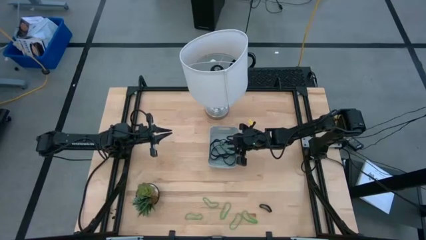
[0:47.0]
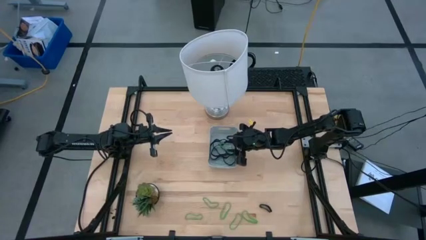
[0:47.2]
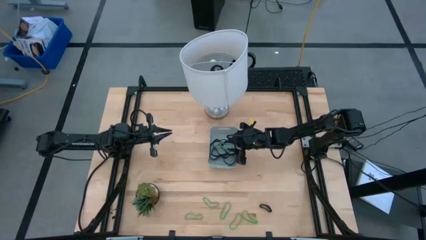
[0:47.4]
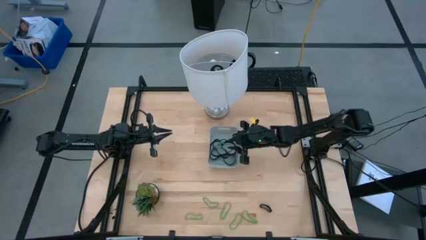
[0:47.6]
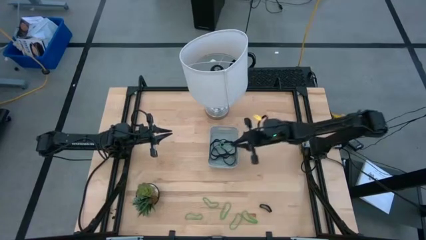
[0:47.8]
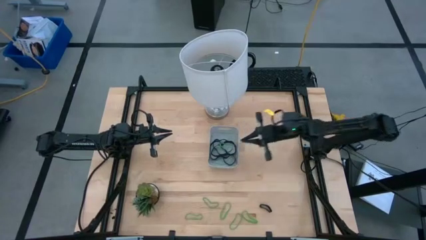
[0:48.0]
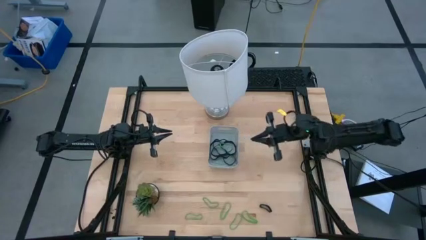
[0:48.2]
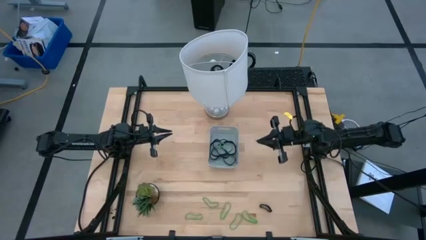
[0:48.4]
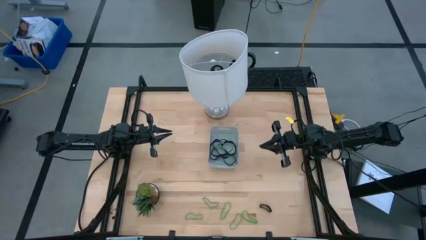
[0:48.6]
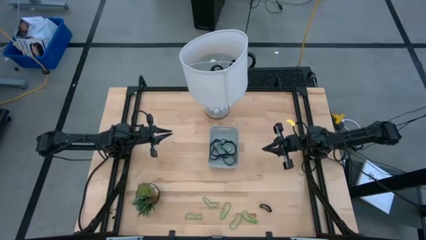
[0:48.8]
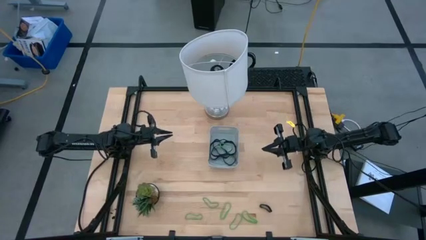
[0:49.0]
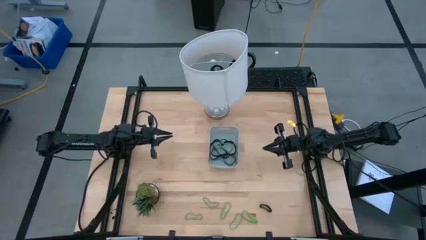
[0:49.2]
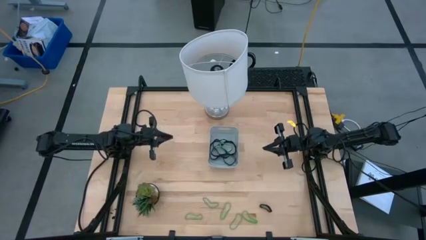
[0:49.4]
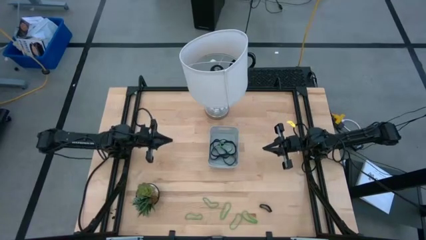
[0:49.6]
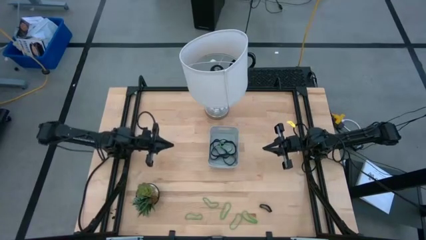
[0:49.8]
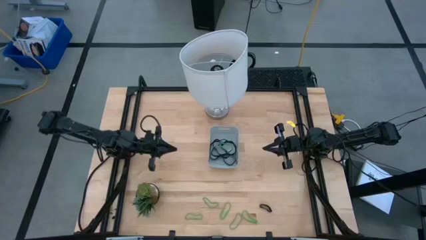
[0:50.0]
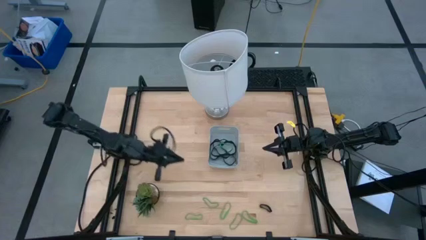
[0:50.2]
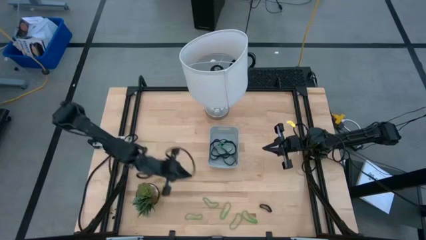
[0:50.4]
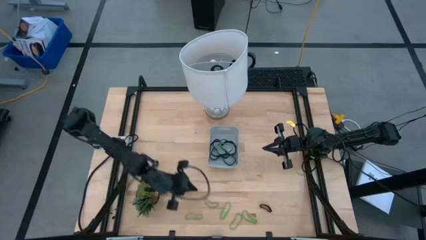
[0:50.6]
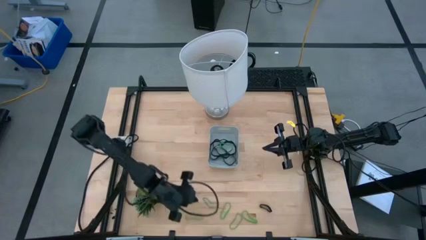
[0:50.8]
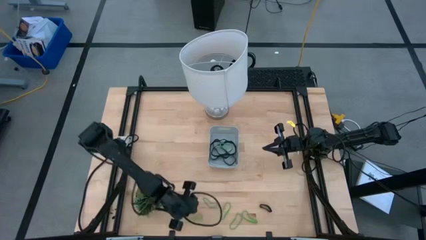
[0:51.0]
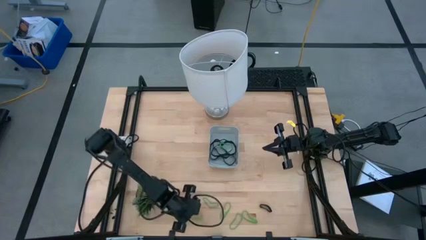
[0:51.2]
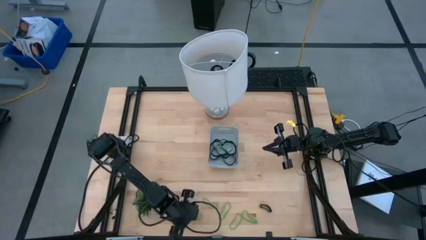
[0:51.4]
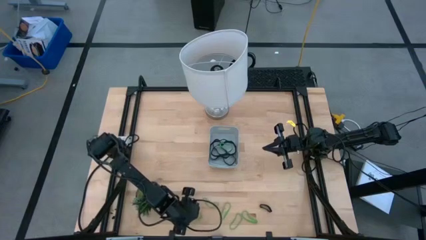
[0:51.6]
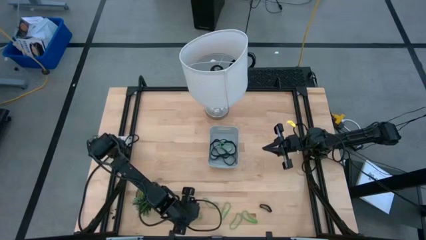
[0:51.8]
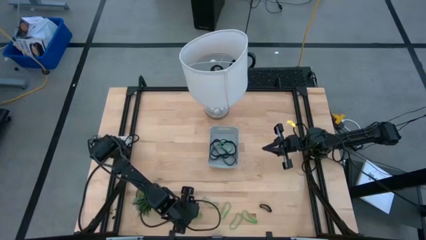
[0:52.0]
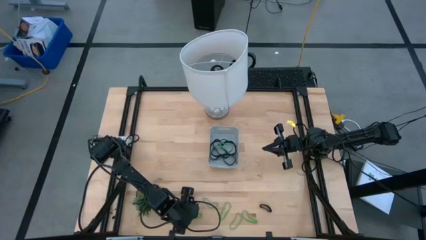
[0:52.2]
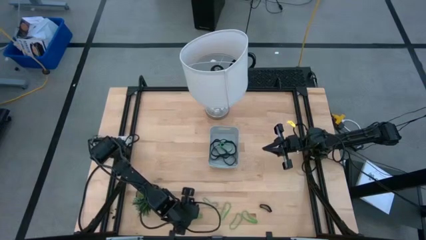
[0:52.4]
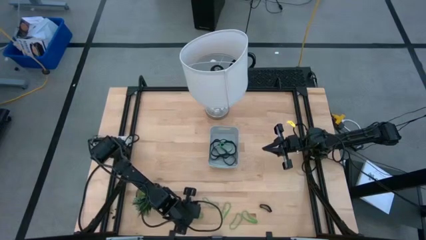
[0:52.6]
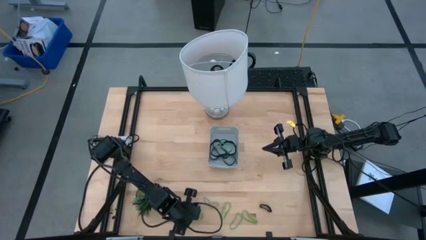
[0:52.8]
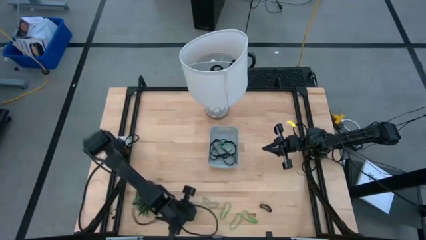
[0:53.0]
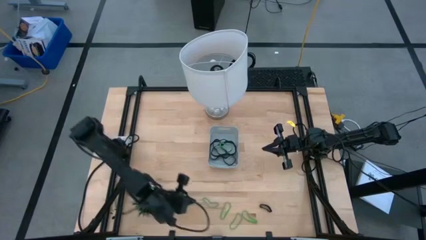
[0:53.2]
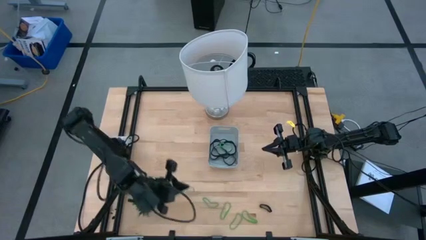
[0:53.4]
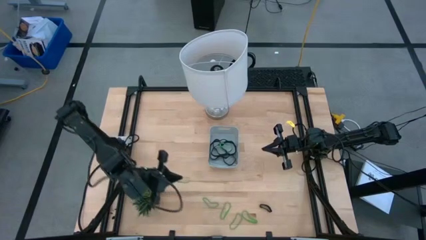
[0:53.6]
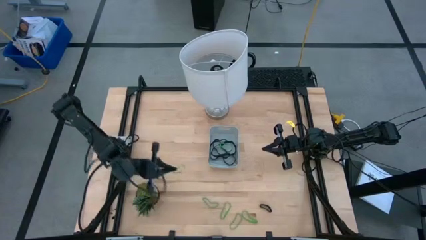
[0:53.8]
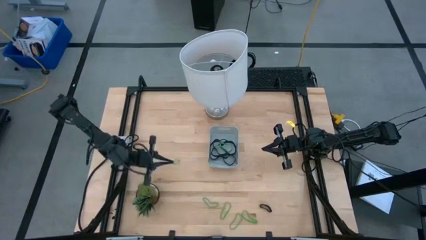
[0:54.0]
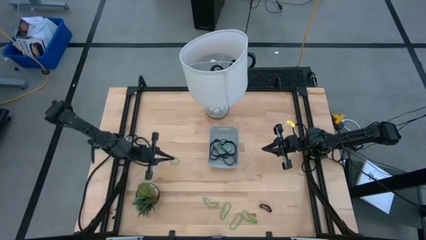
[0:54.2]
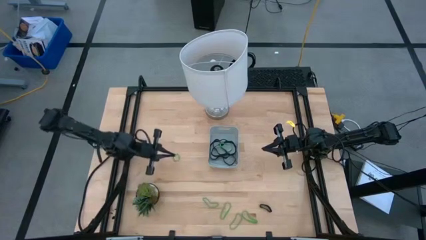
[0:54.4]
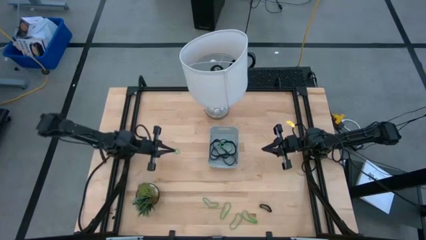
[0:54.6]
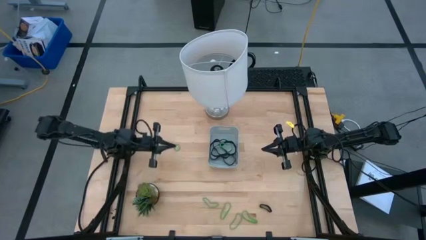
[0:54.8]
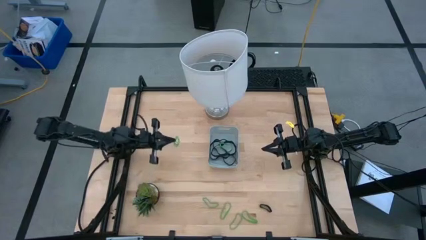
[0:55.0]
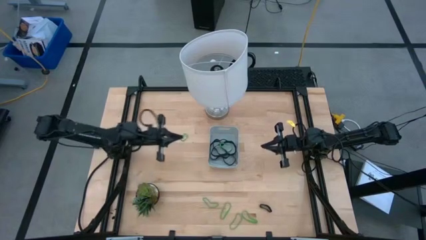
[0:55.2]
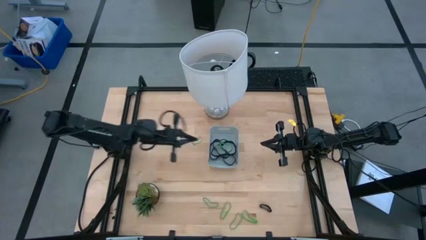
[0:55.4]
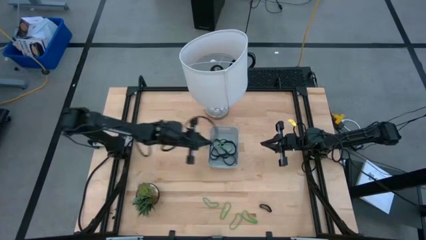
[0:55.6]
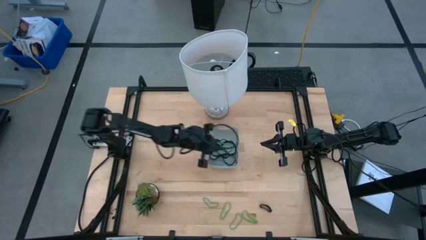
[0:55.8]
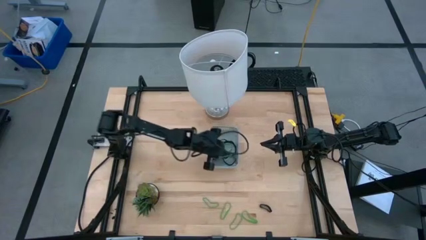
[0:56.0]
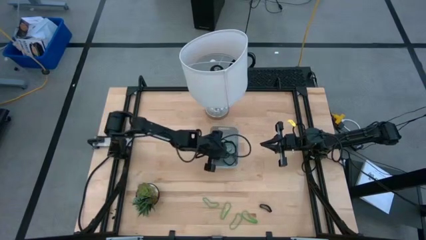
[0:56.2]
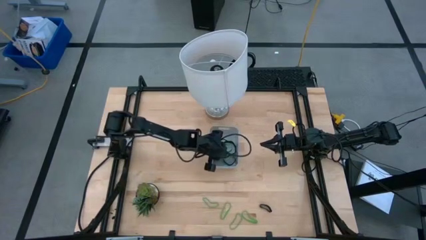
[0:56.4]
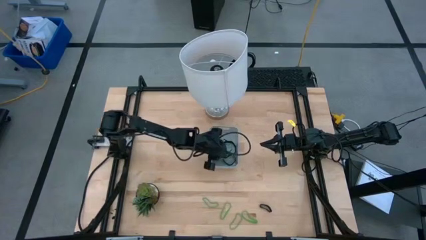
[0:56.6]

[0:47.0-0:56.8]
Task: Pick and place rubber bands into bin
Put the green rubber band into the gray bin
